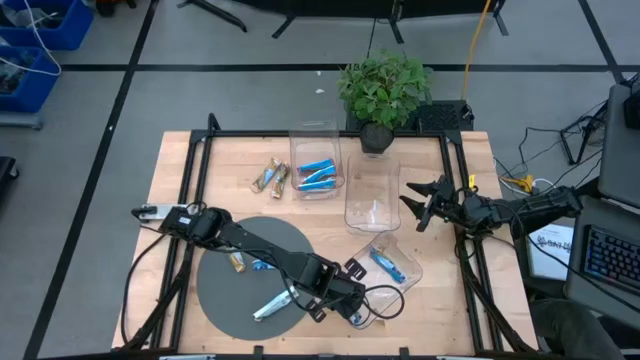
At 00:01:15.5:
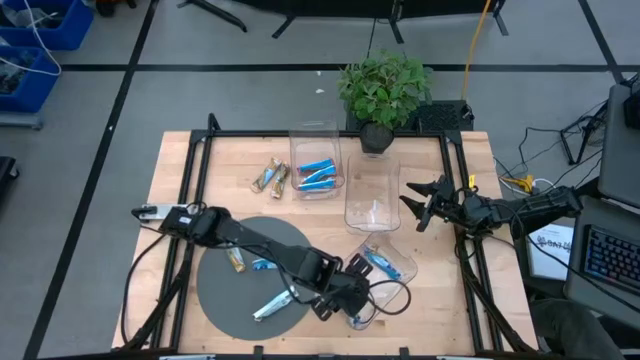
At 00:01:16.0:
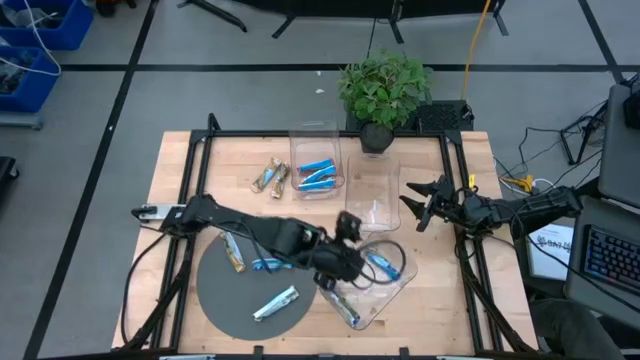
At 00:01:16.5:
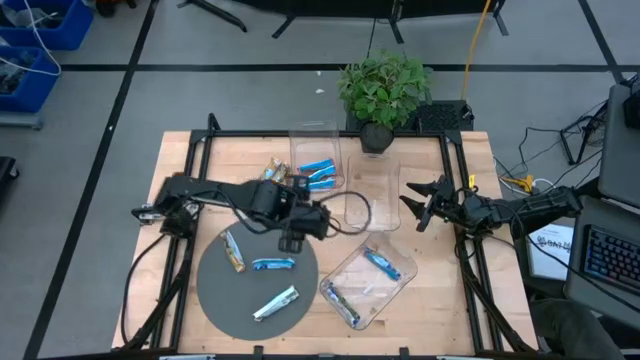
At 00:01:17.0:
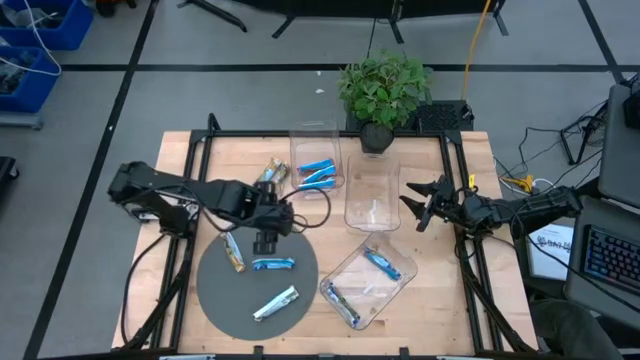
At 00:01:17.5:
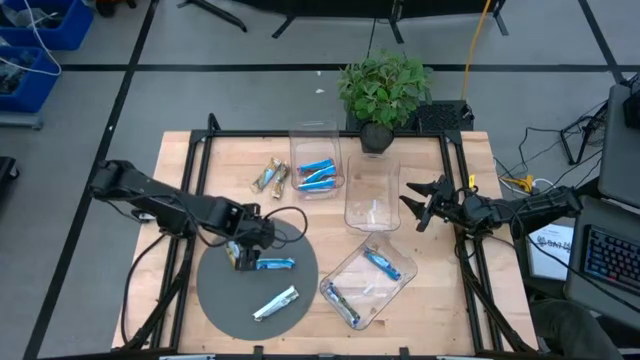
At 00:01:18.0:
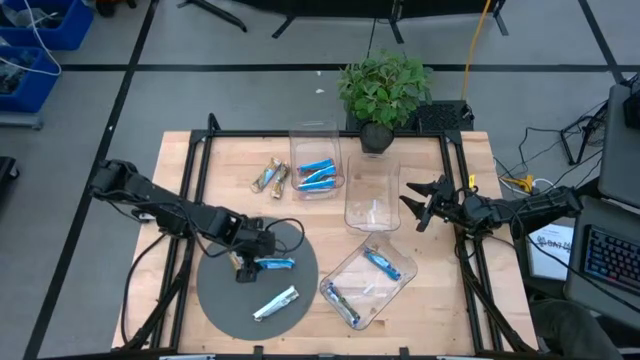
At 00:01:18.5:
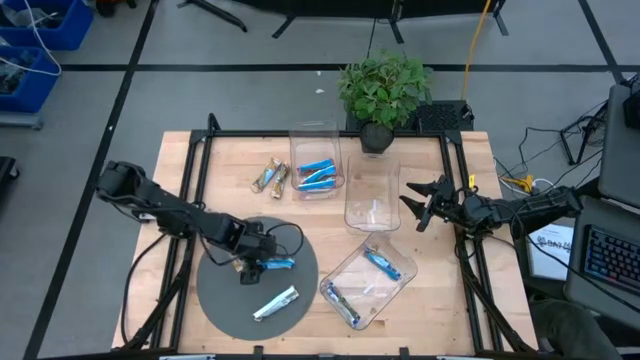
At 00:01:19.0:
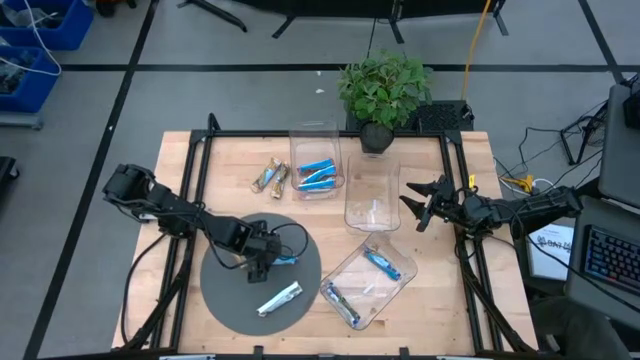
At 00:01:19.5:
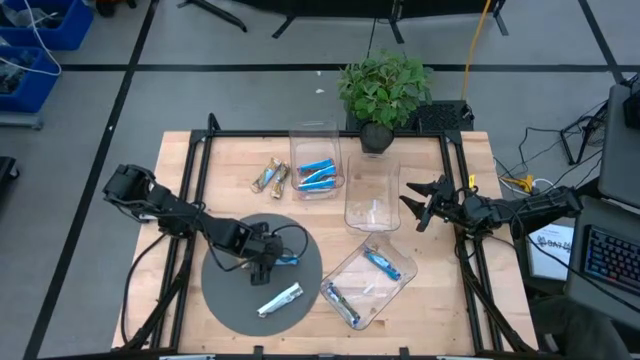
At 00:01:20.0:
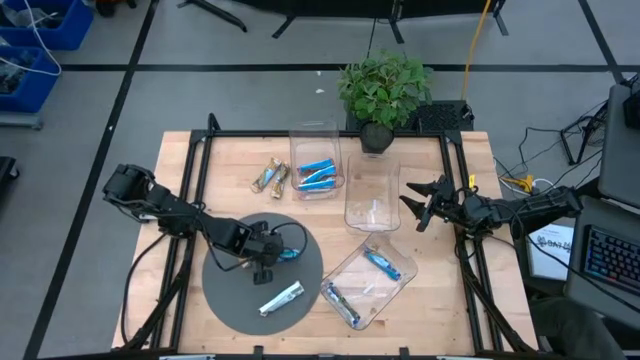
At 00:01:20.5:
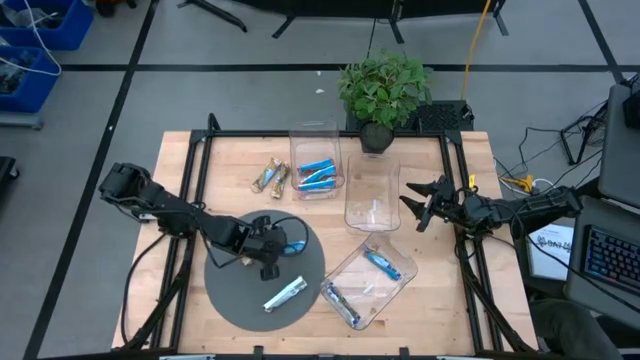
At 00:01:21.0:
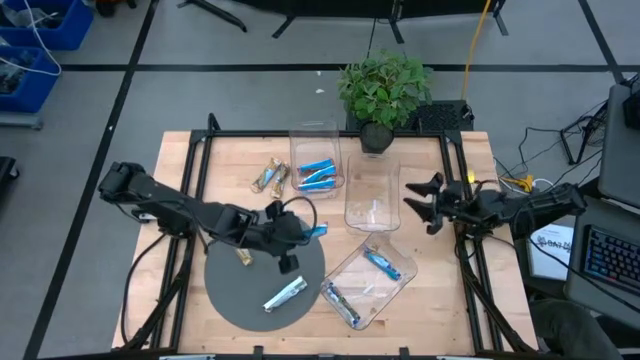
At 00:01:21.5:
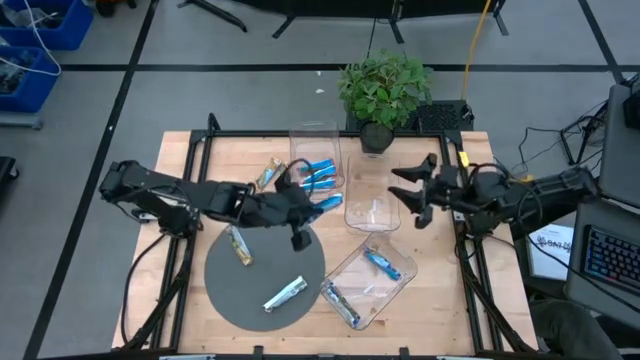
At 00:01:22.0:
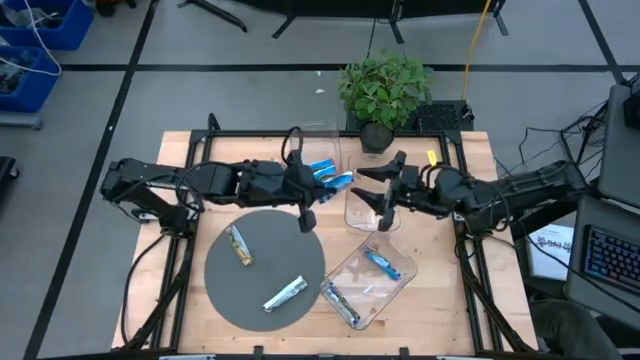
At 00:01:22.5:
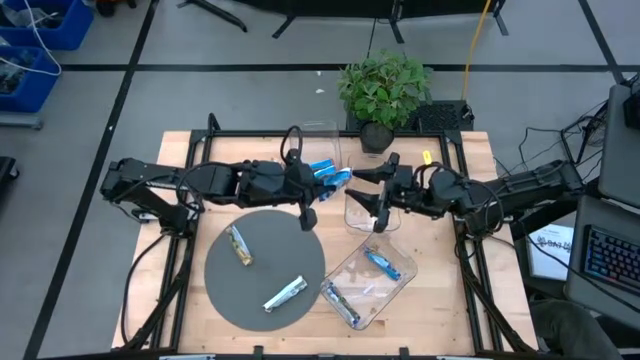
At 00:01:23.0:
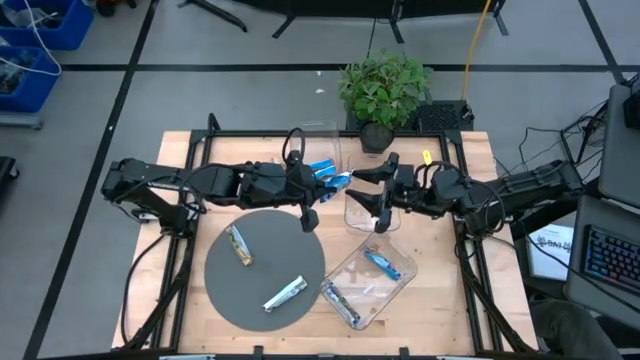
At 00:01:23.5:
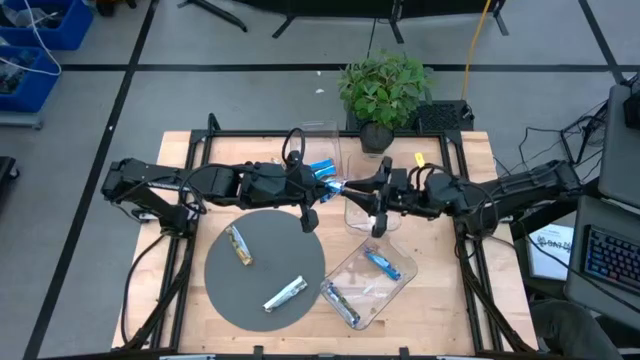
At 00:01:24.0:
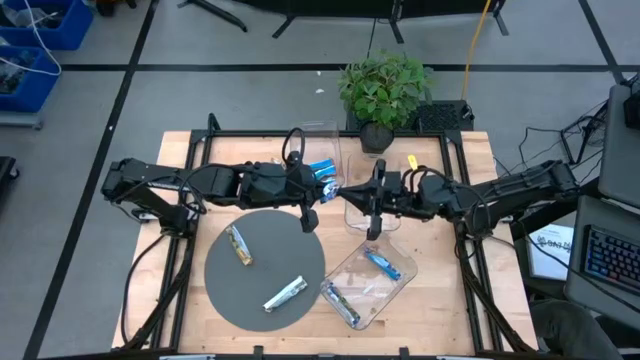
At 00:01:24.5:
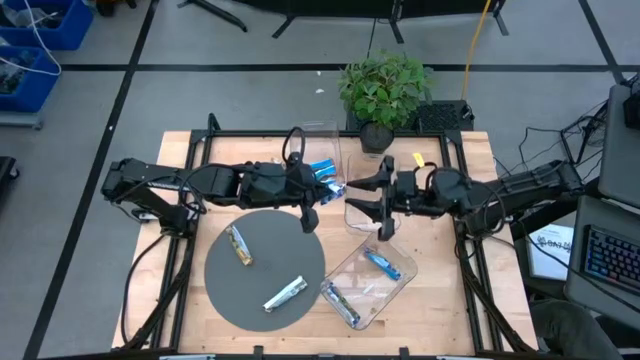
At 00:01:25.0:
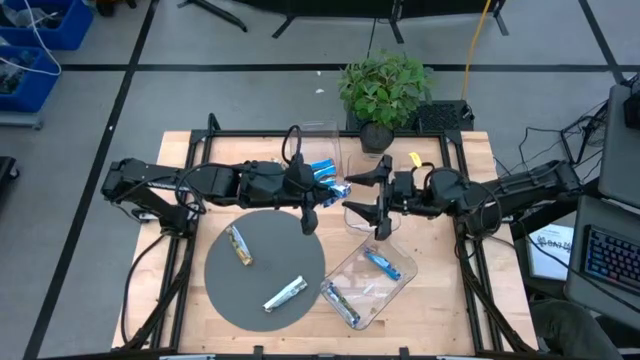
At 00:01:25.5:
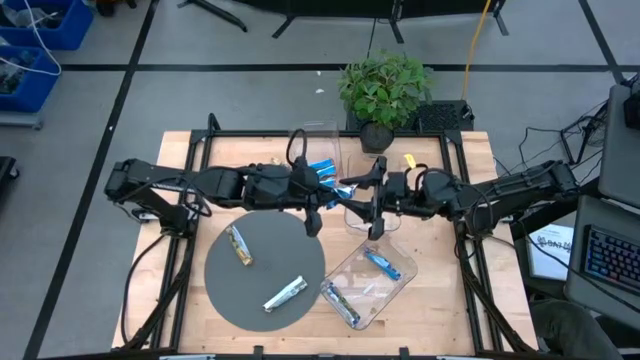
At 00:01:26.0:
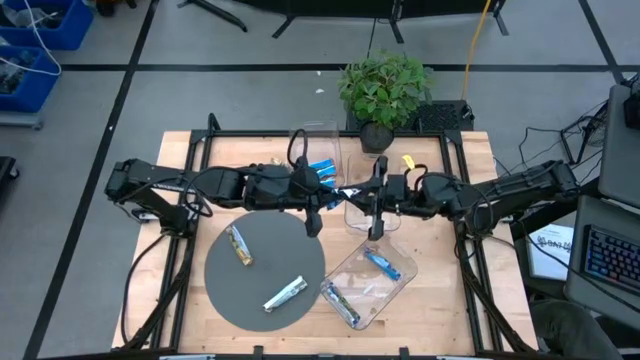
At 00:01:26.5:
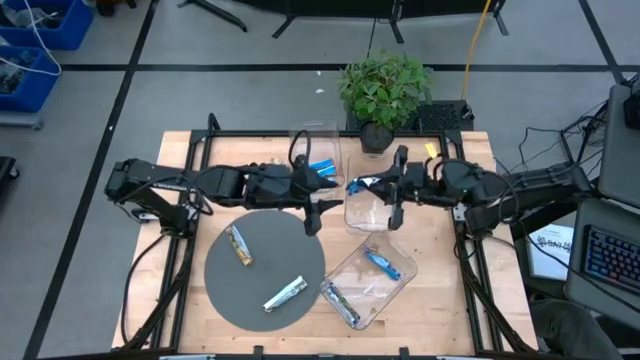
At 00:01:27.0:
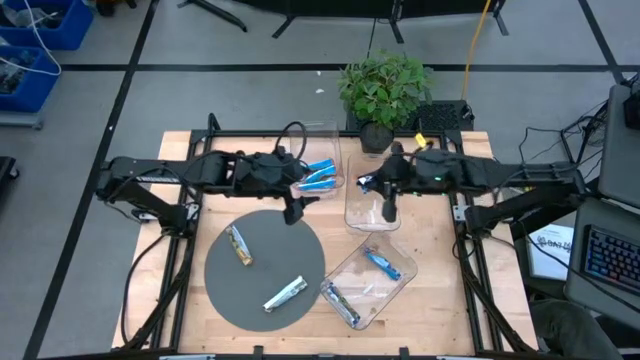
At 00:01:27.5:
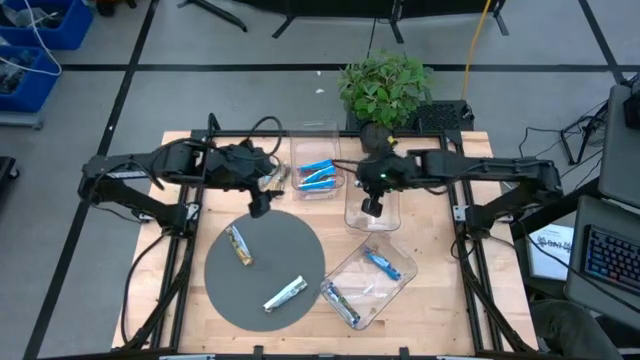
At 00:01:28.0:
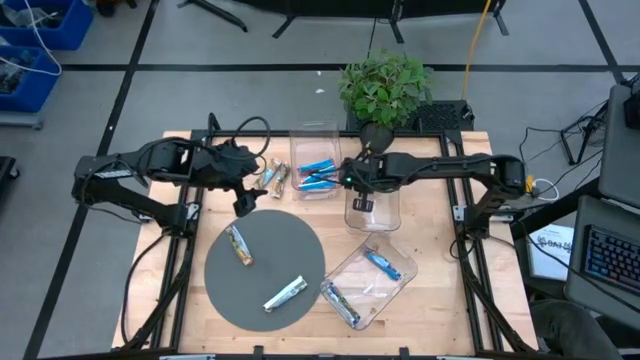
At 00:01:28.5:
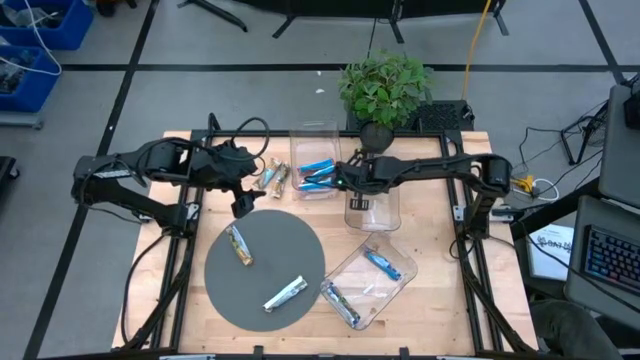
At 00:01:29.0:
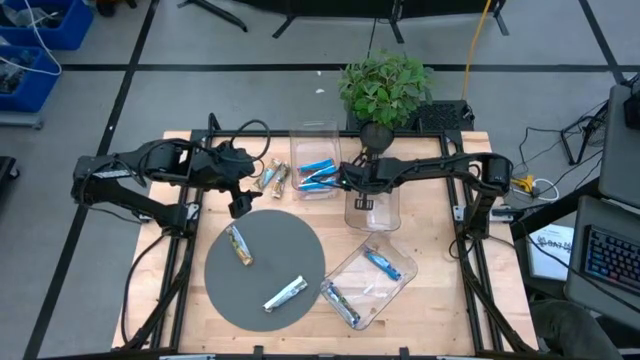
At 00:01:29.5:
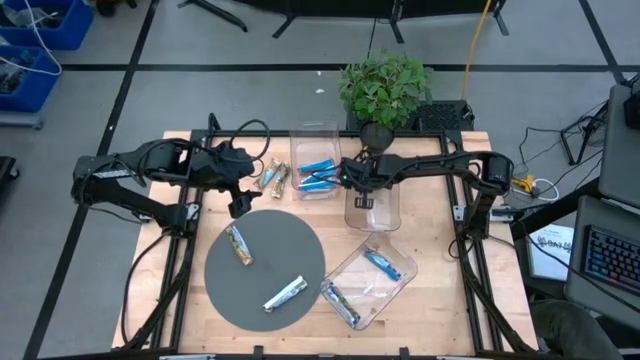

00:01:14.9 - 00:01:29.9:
Task: Pick and place Granola Bars by type
Put the blue granola bar into the bottom transparent bin

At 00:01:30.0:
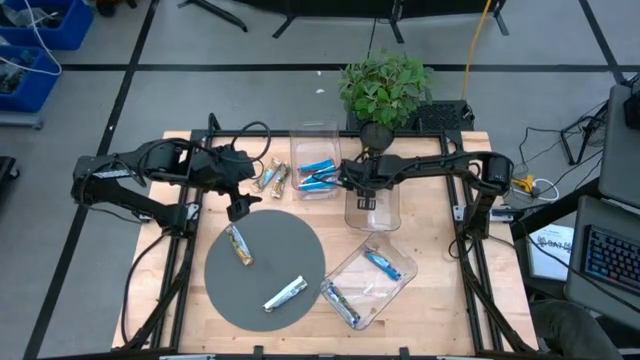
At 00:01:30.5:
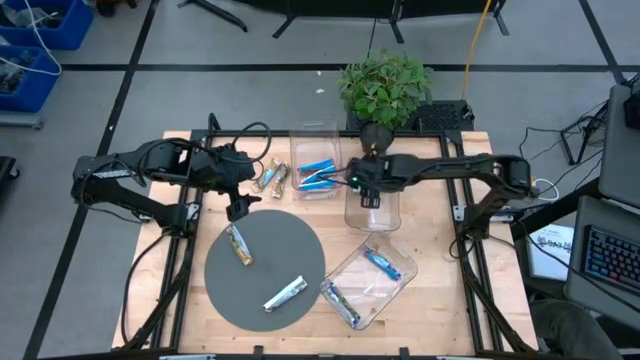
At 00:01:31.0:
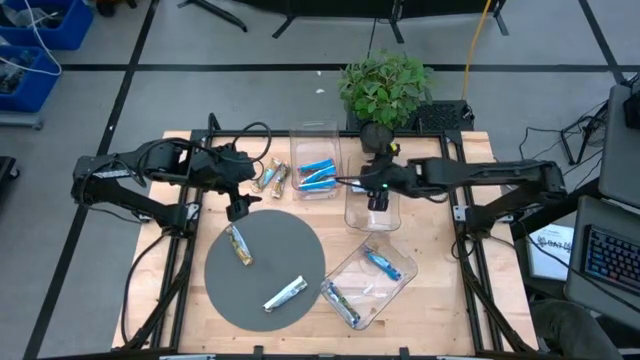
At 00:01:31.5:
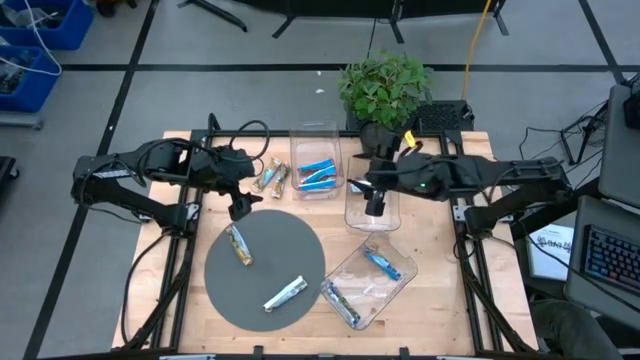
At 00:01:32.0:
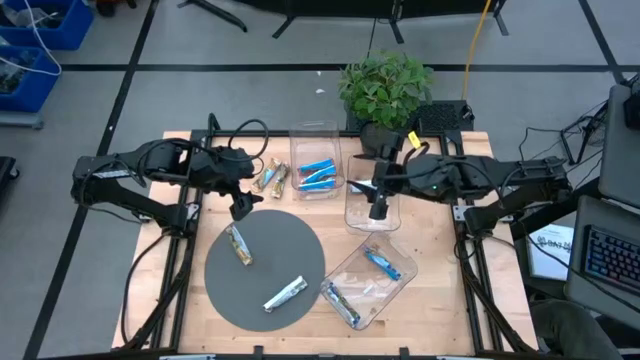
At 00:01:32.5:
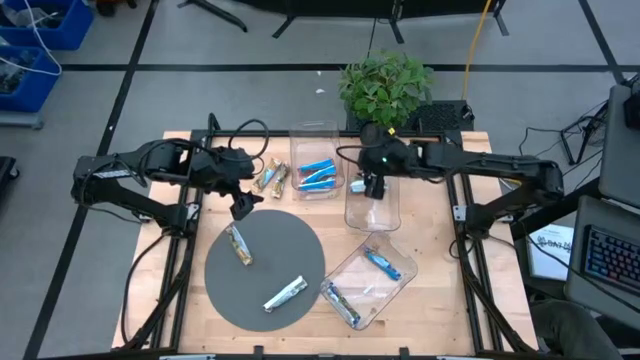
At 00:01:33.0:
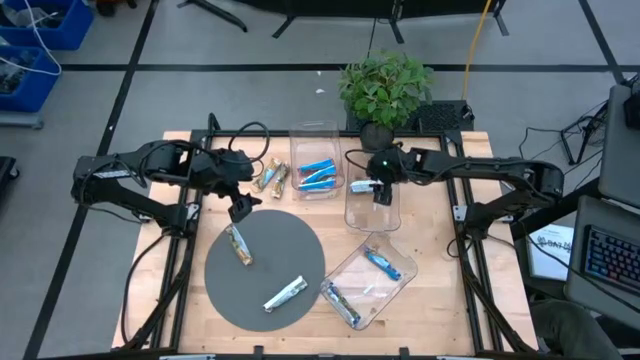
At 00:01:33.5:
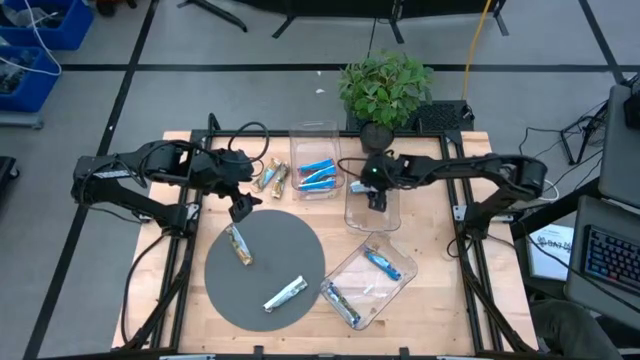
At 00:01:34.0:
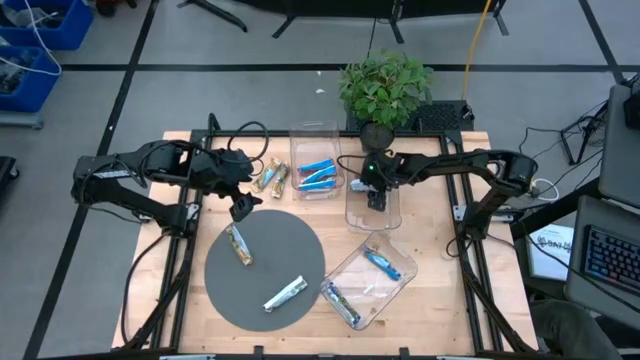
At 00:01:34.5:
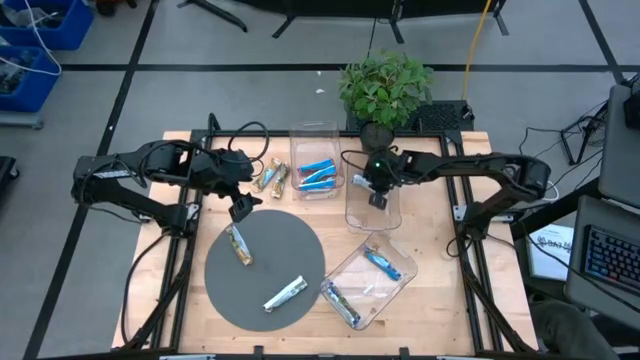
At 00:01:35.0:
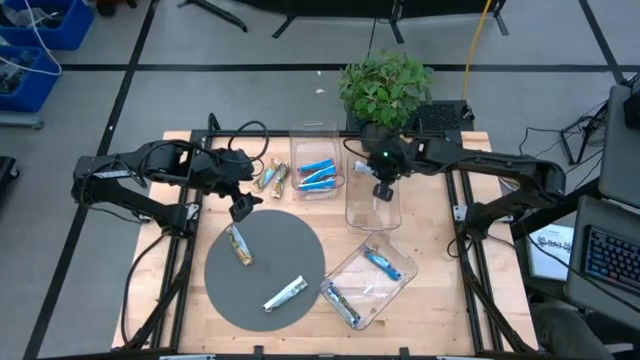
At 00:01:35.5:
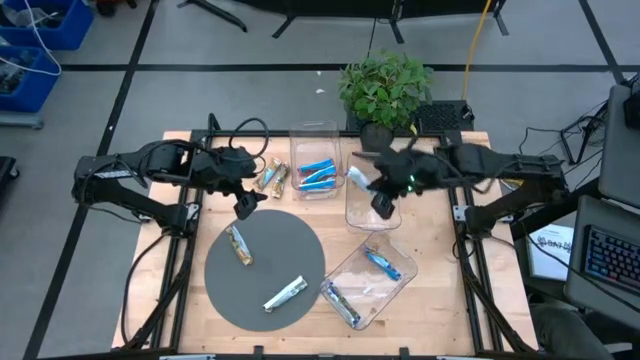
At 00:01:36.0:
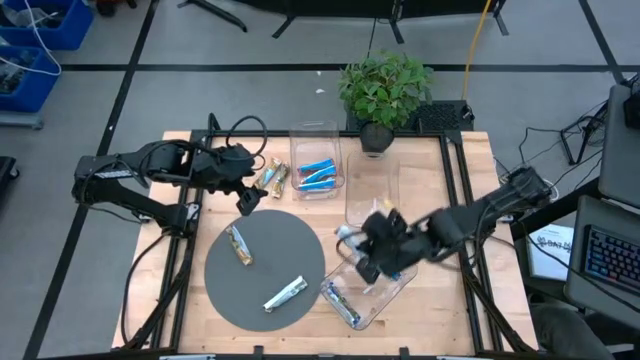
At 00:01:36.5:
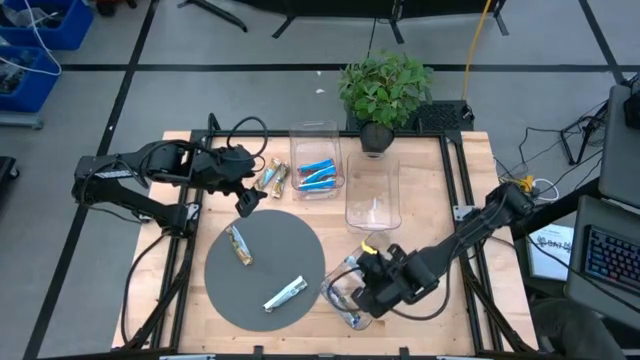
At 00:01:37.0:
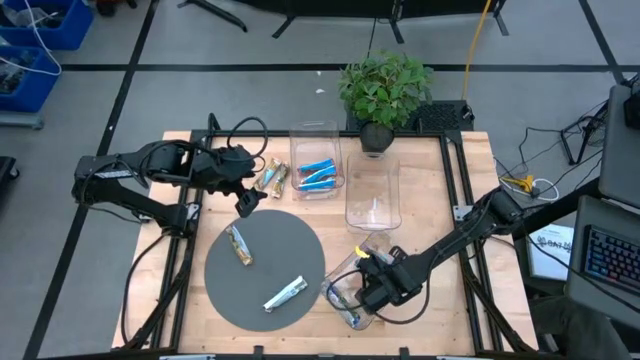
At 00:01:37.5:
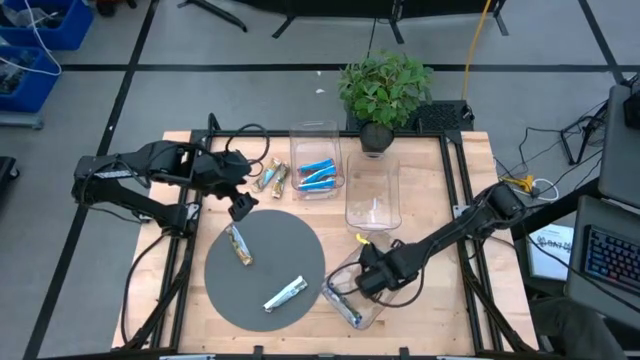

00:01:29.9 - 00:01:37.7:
Put the blue granola bar into the bottom transparent bin
